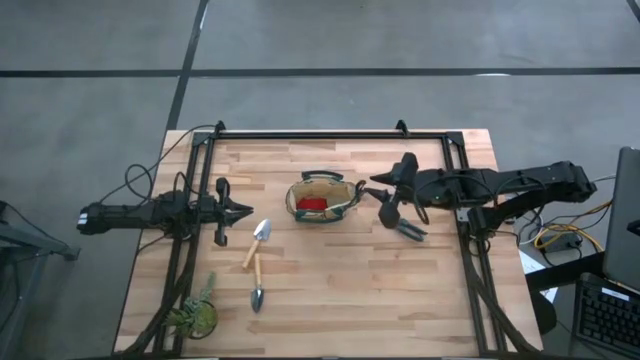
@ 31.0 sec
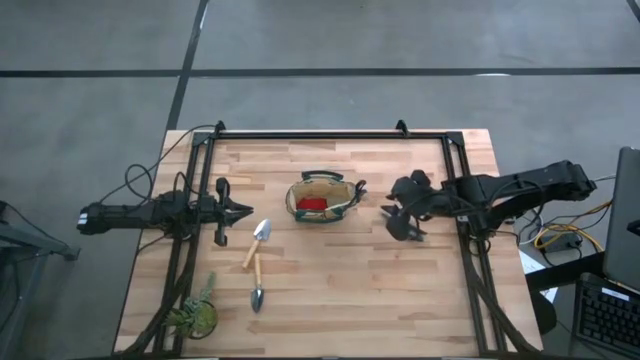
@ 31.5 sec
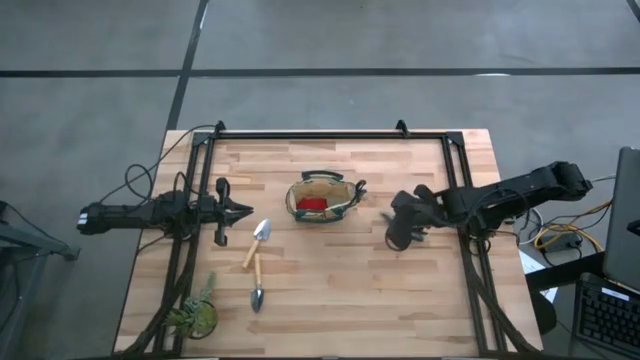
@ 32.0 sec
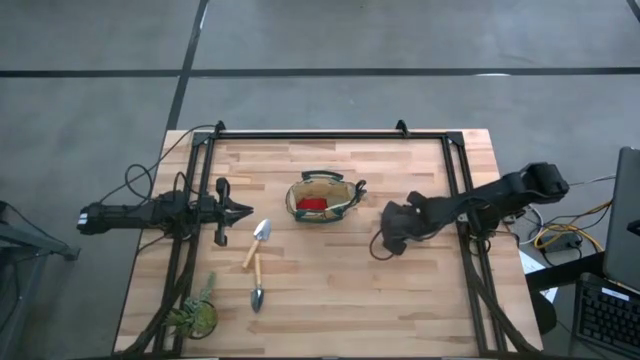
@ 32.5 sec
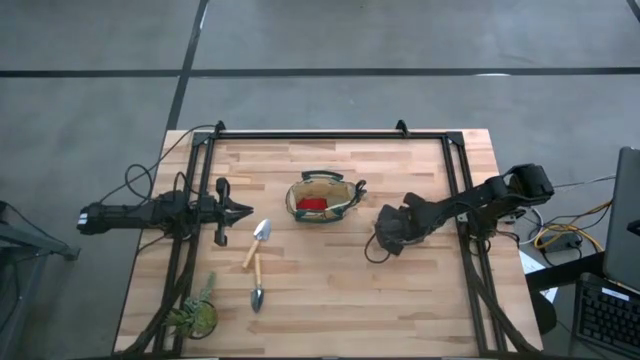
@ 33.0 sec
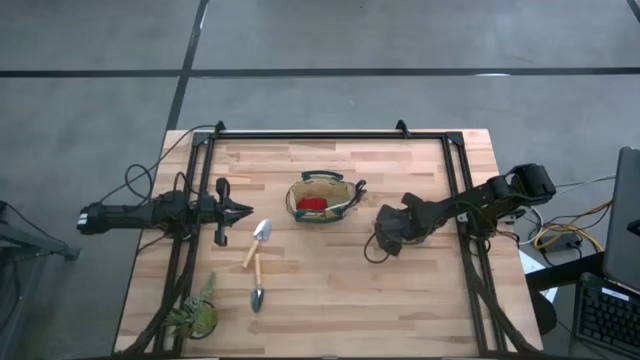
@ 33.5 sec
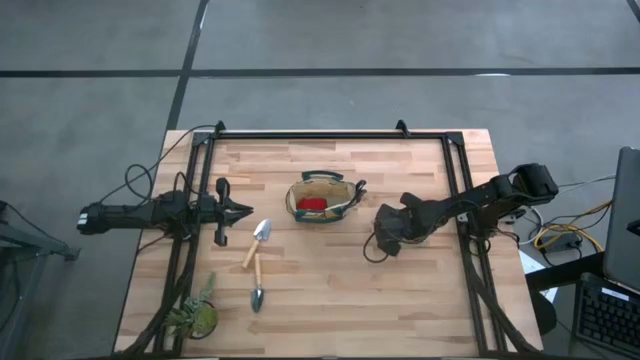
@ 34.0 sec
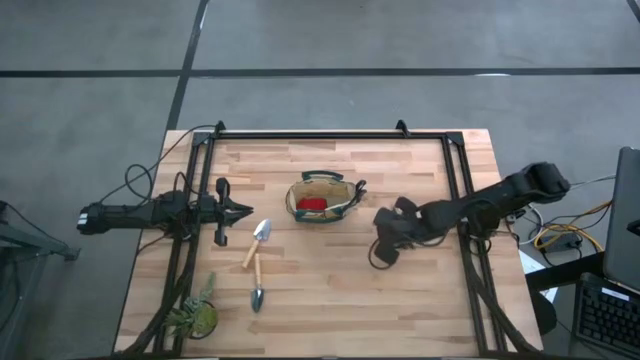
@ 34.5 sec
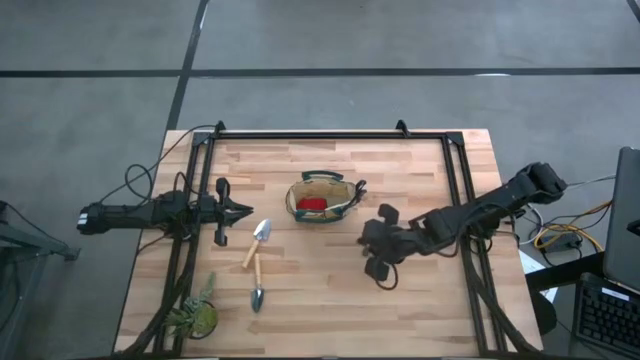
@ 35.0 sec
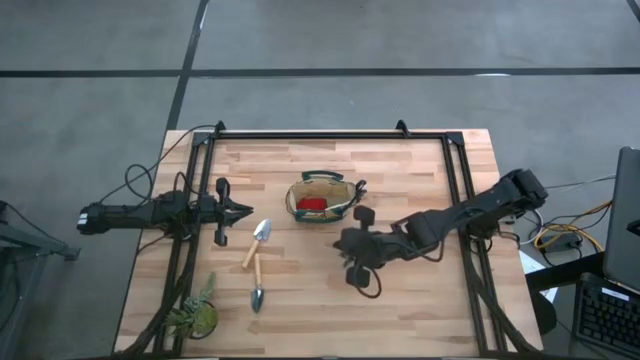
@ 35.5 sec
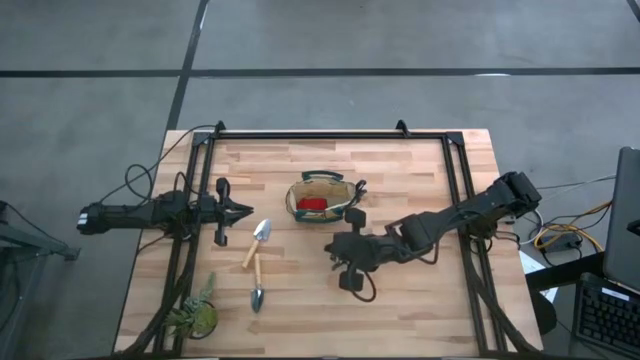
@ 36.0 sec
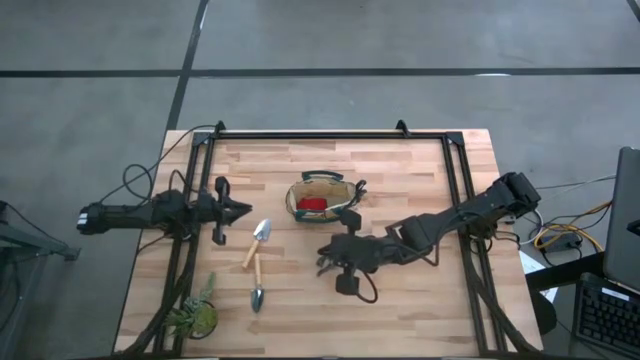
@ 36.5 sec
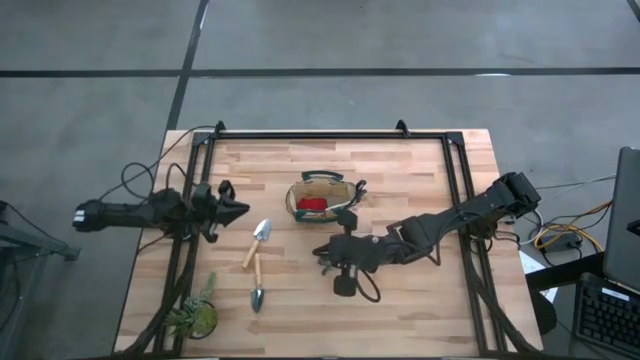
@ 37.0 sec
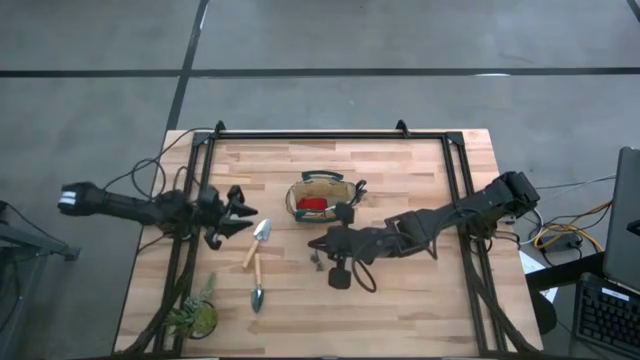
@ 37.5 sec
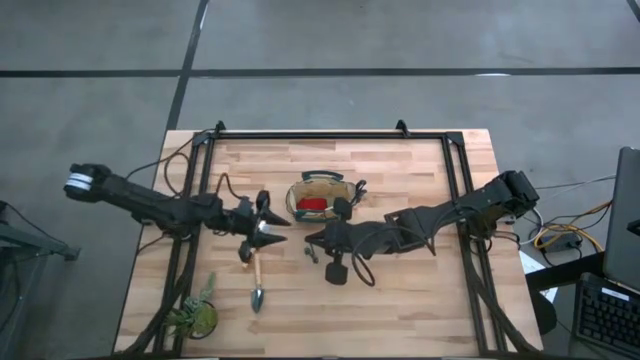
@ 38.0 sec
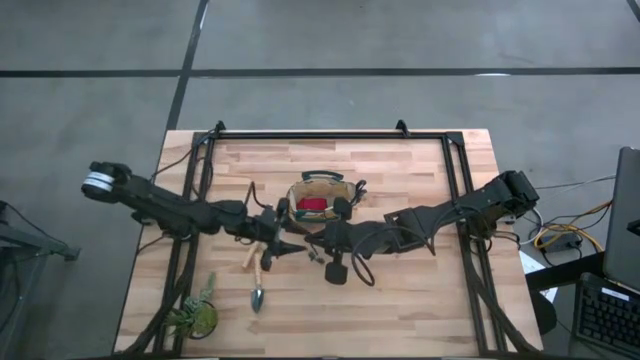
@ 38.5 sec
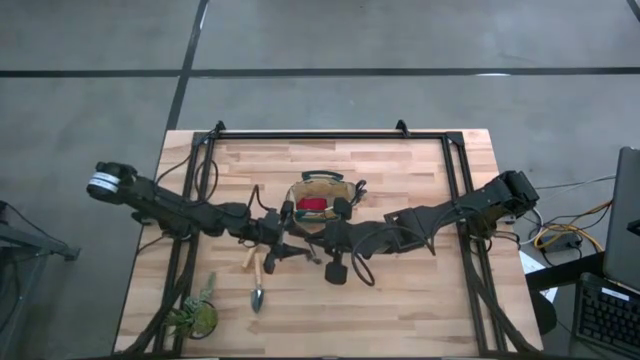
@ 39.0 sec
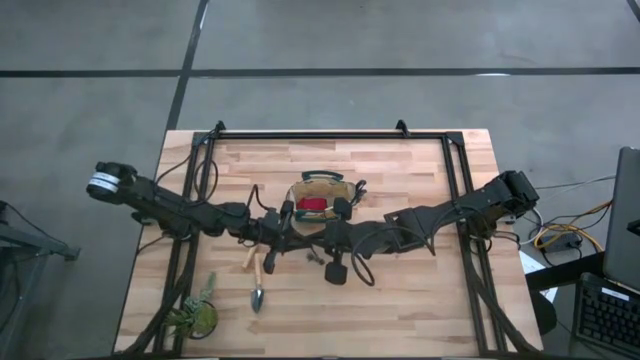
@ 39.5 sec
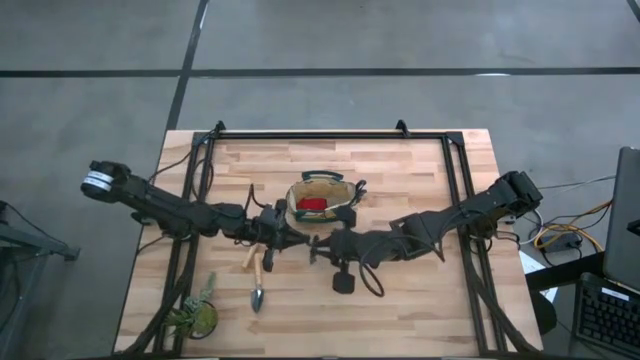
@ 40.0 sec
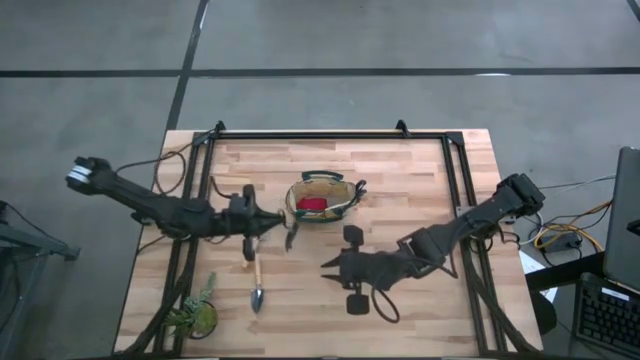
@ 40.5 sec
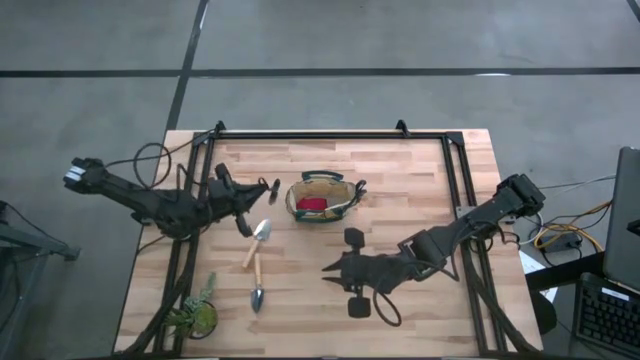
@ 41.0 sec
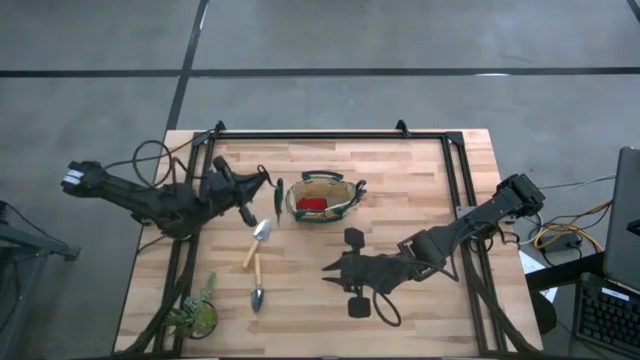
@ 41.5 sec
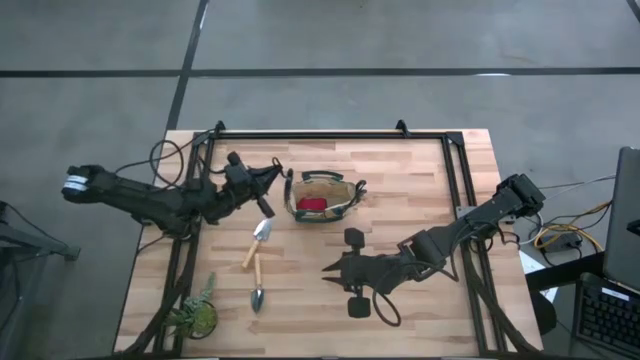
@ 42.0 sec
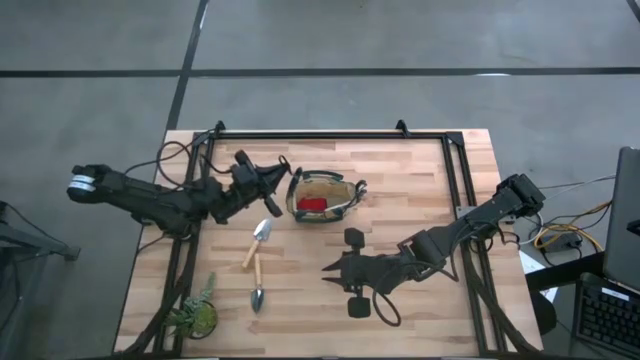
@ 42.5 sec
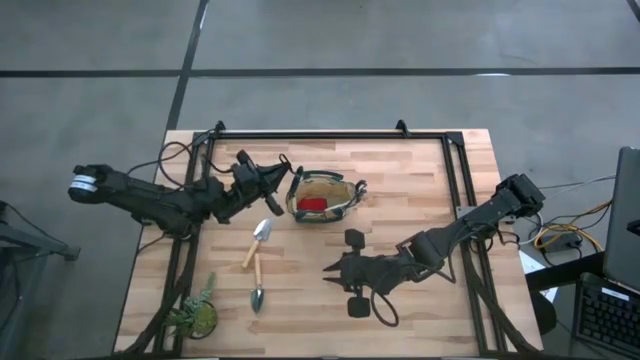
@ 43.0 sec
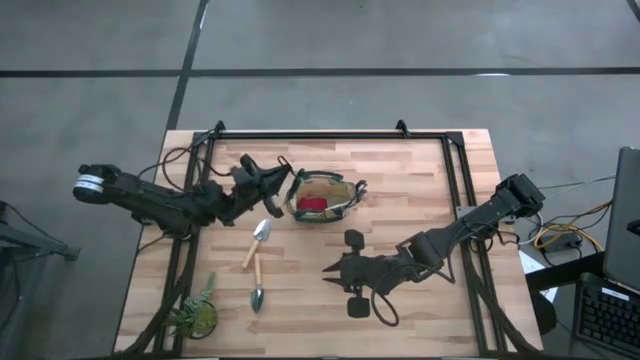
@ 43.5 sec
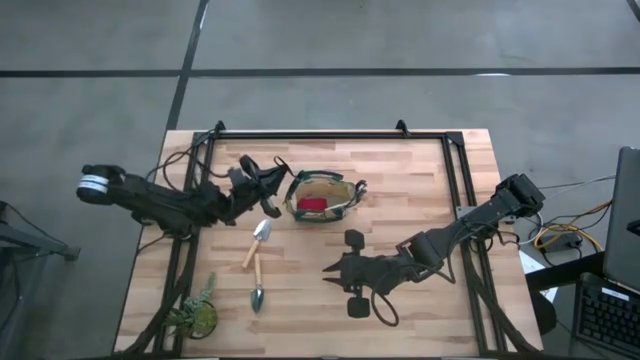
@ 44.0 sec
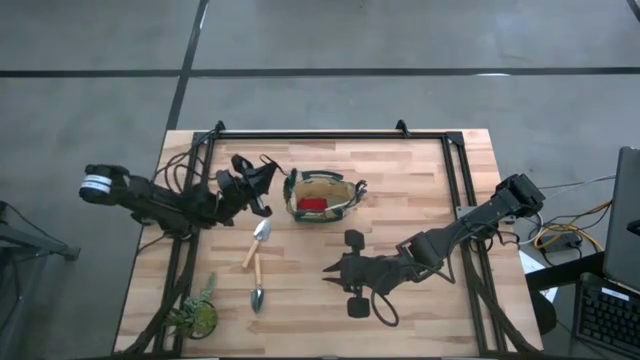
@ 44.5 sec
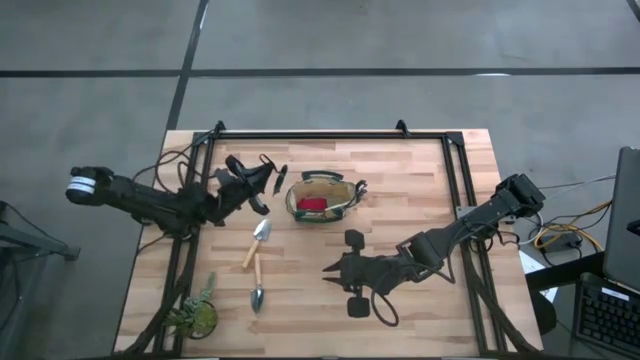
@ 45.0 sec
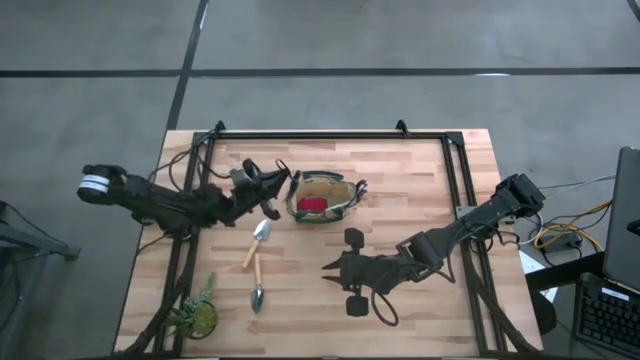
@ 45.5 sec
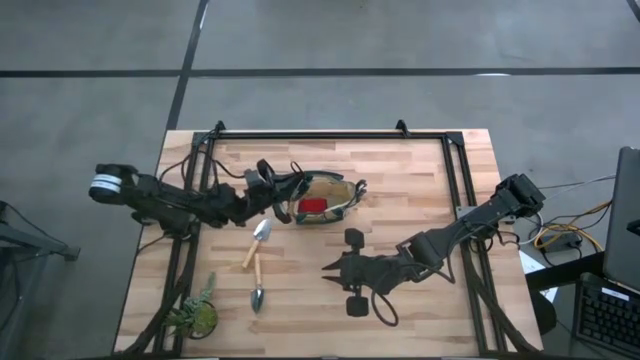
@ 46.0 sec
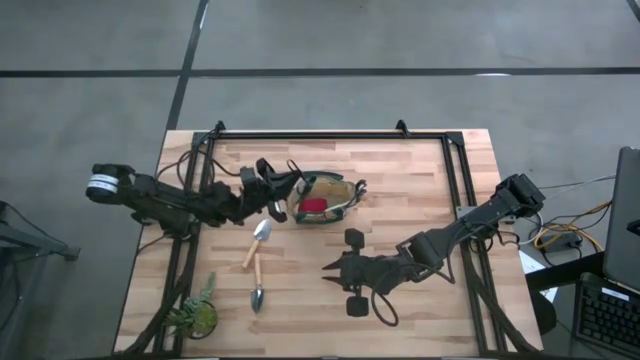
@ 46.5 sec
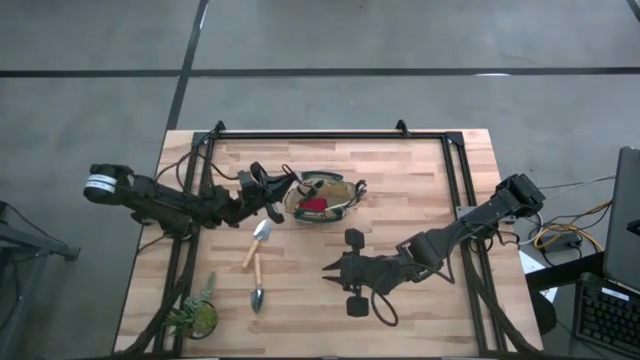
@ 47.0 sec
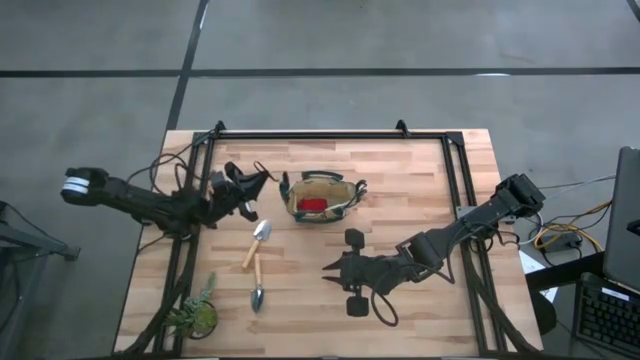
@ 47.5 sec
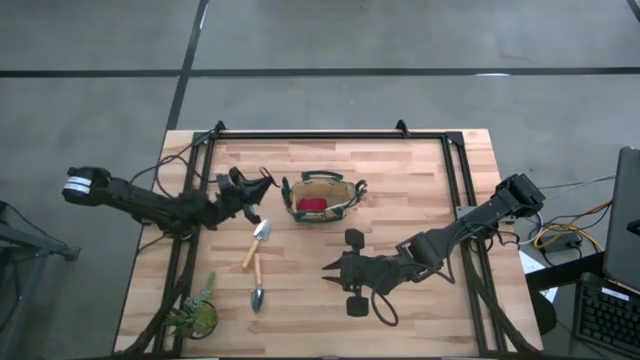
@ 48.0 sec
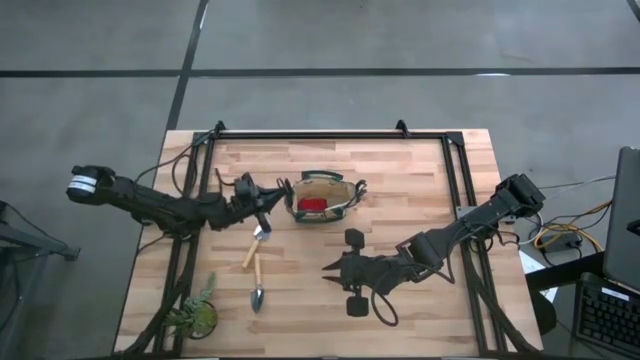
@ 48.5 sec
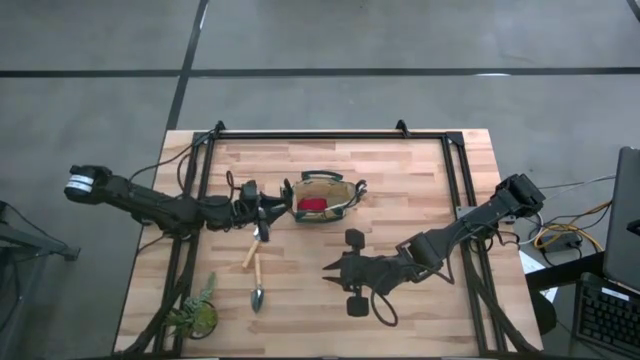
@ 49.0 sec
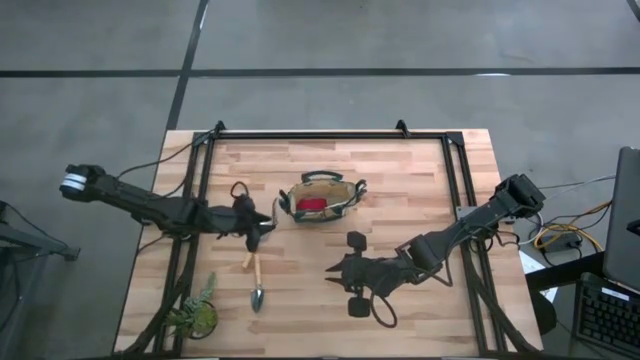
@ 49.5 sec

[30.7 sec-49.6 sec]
Task: Pick & Place Garden tools in Gardening bag
Put the green shear scissors into the light brown gardening bag
